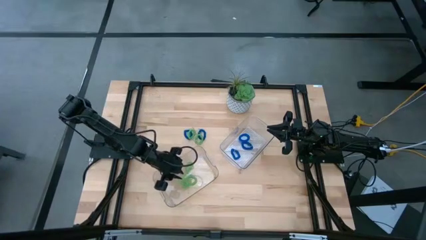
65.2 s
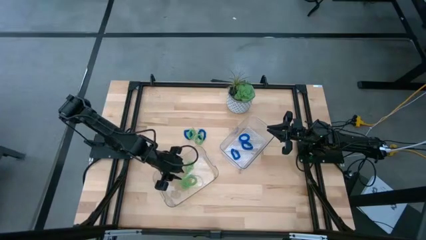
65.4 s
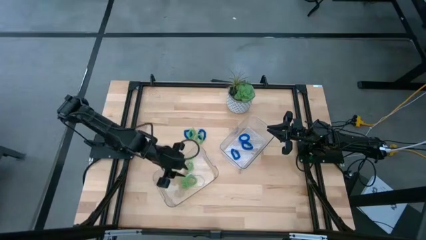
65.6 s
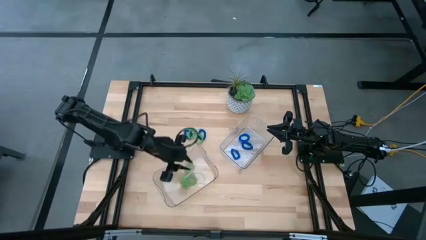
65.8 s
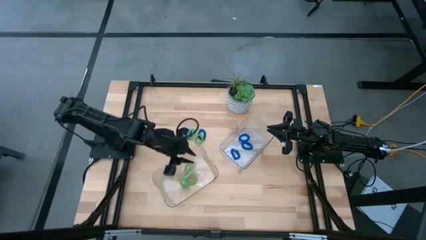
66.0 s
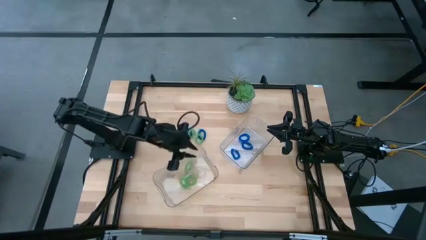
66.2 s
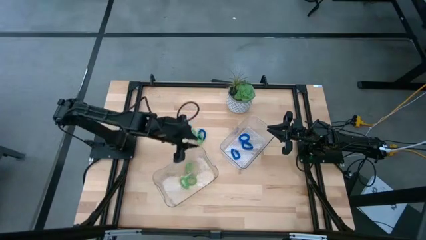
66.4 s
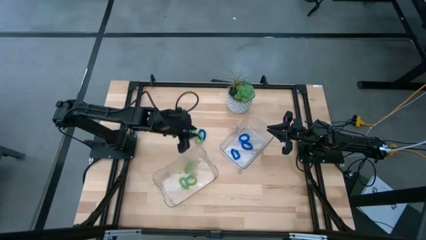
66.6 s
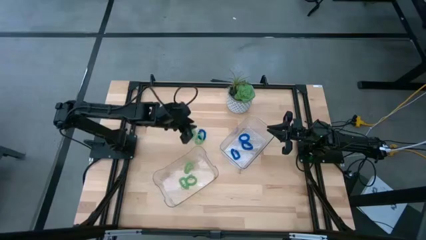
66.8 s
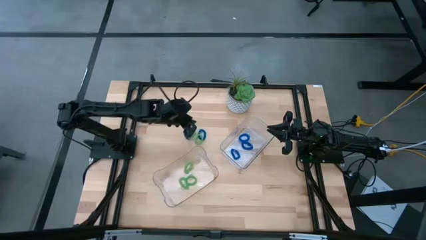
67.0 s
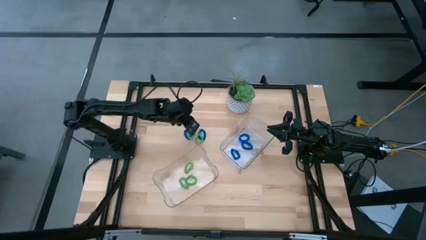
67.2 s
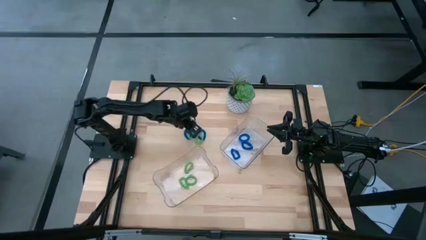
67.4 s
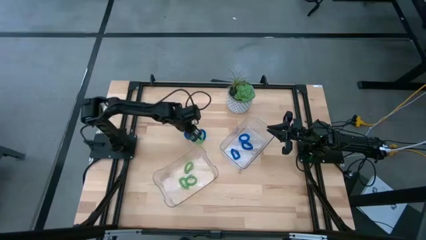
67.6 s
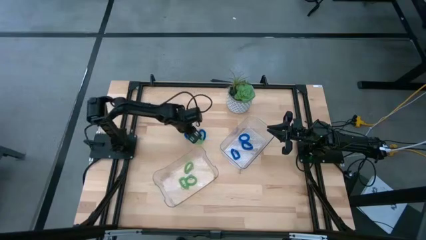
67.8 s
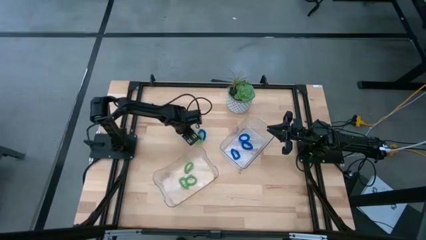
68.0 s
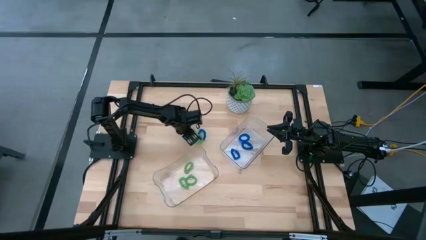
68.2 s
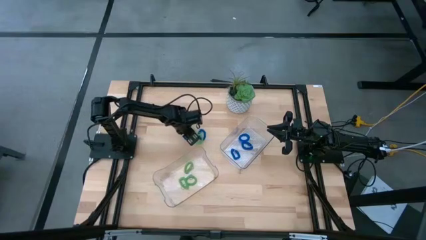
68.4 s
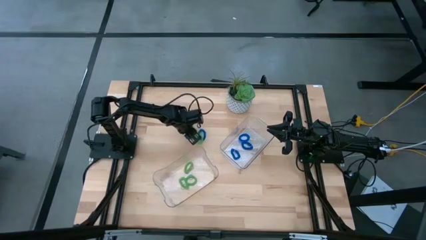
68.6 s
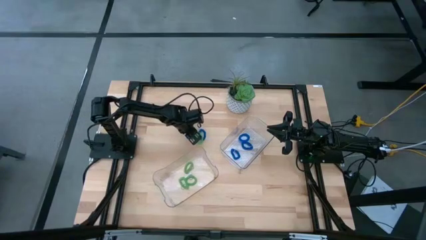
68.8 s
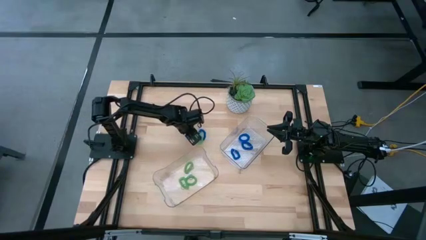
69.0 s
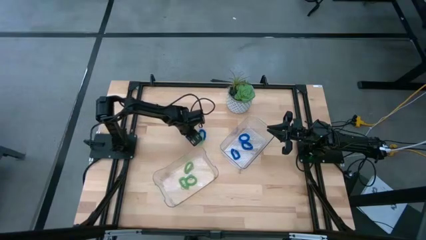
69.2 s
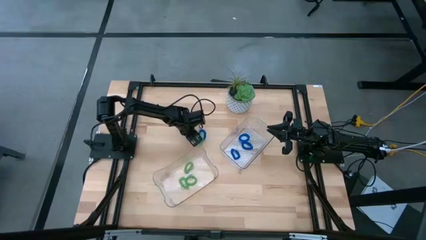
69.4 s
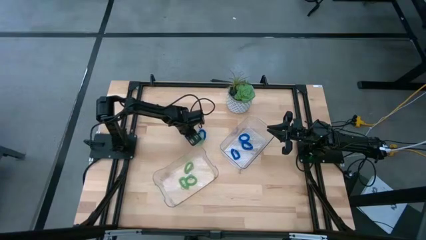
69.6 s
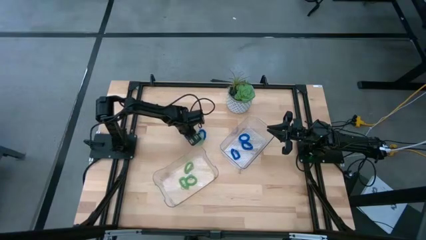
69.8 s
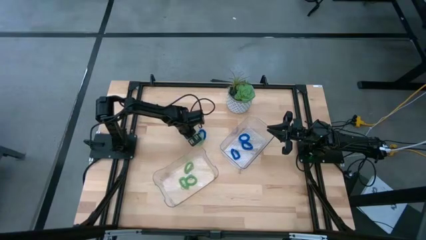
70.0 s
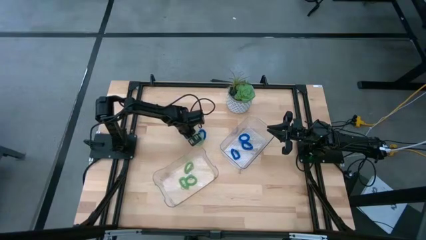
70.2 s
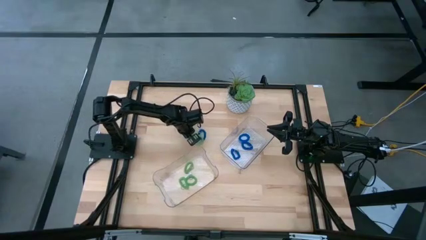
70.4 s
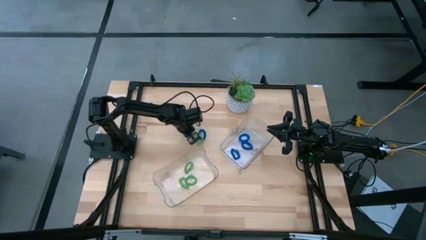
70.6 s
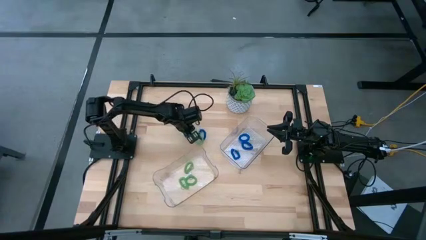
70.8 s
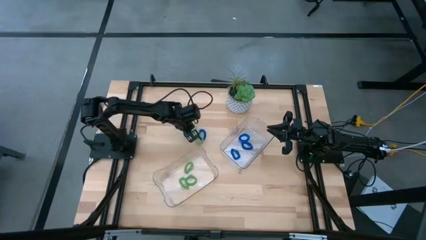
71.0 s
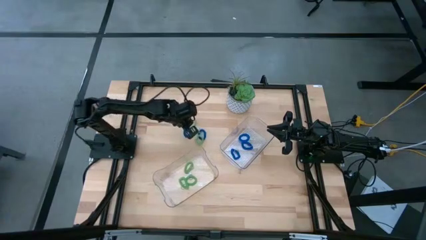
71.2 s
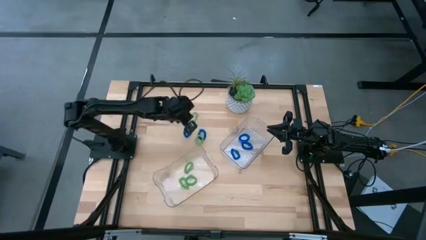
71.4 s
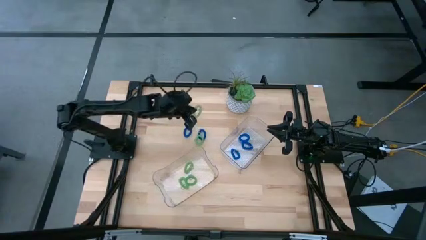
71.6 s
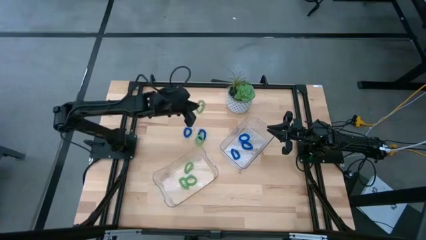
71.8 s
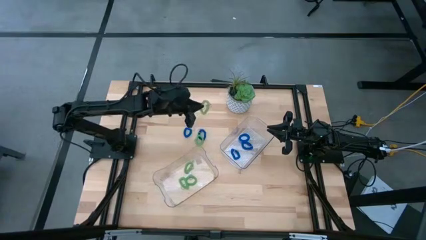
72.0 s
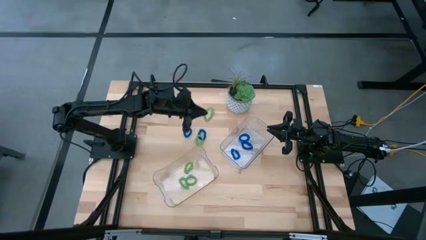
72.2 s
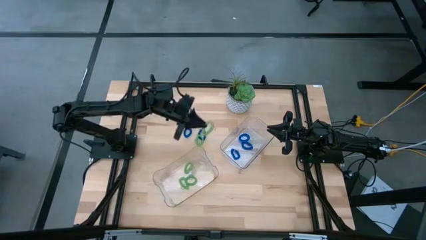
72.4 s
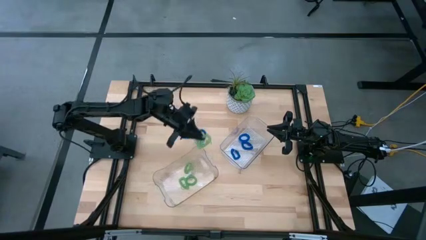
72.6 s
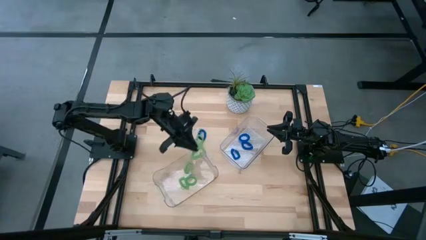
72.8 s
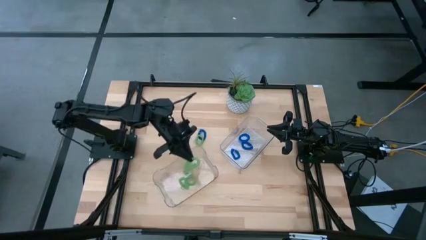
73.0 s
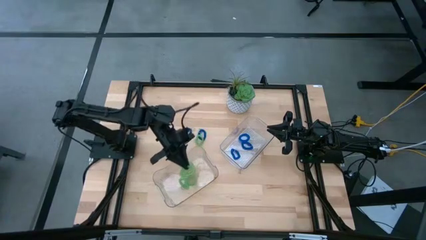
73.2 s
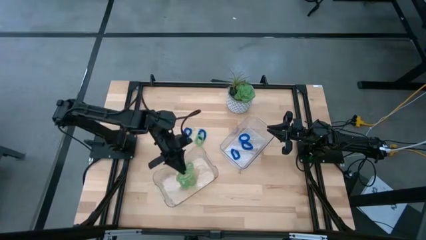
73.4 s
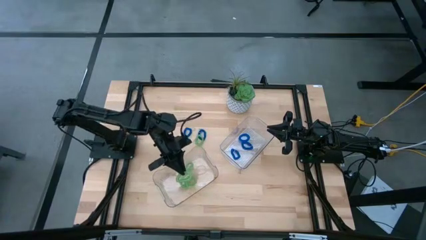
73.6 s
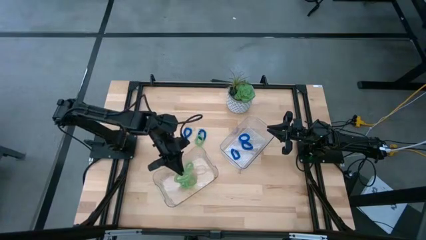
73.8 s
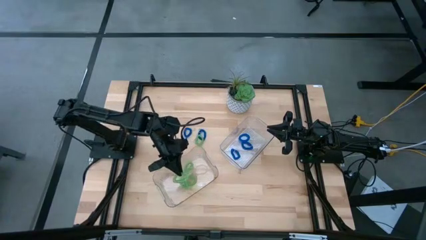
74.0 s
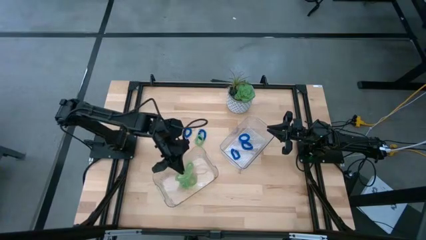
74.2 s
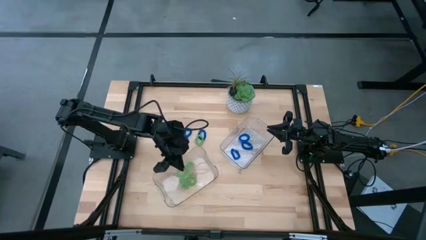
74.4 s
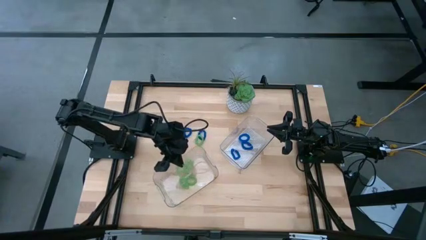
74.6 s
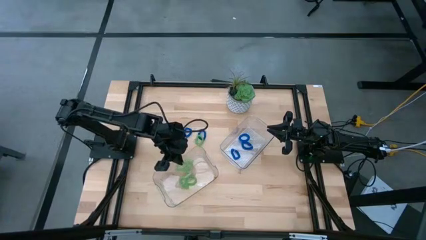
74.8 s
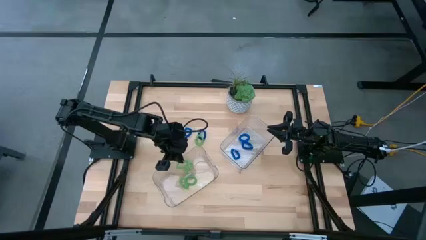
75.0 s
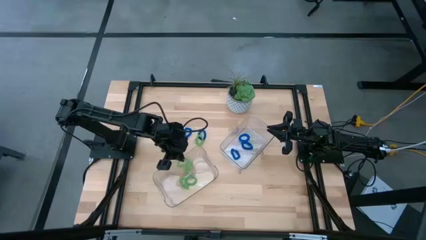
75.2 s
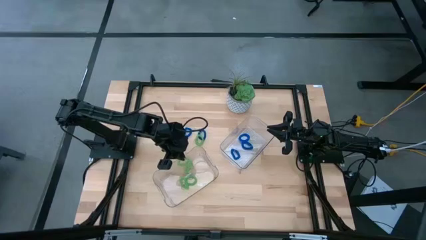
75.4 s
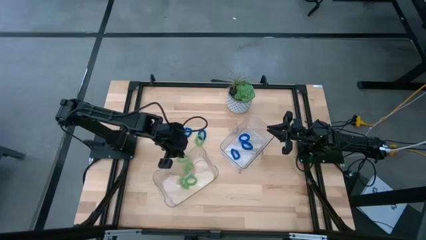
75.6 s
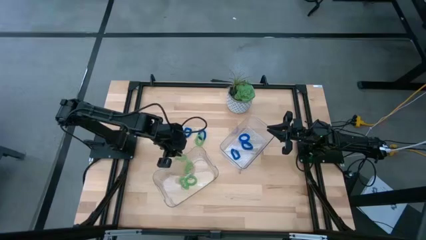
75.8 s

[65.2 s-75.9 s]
Task: Sort spring keychains
Put the green spring keychain into the bottom transparent bin

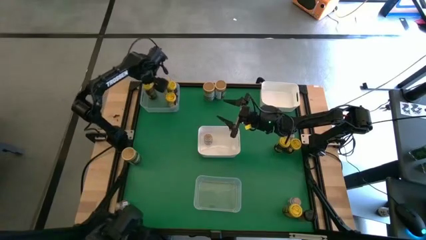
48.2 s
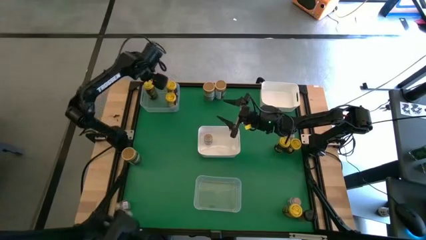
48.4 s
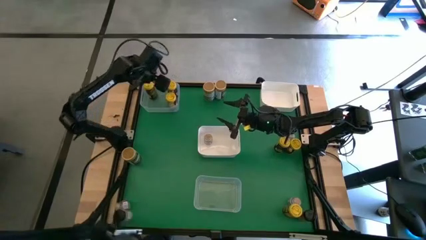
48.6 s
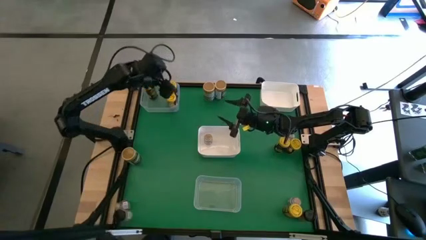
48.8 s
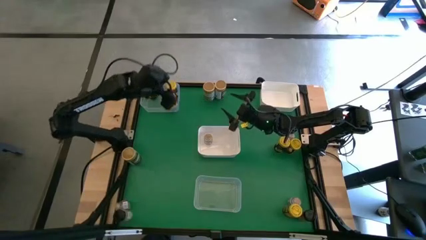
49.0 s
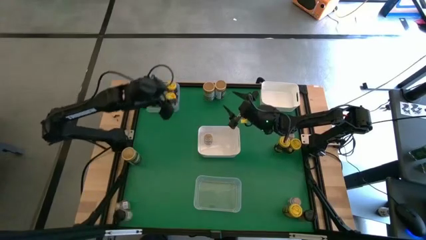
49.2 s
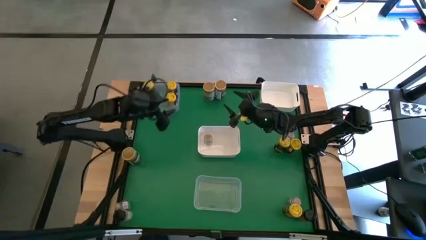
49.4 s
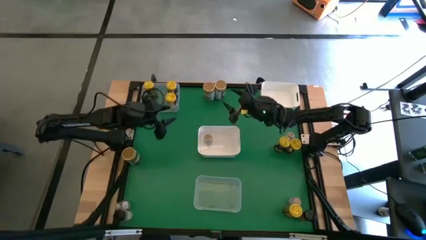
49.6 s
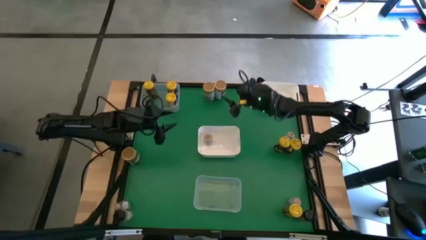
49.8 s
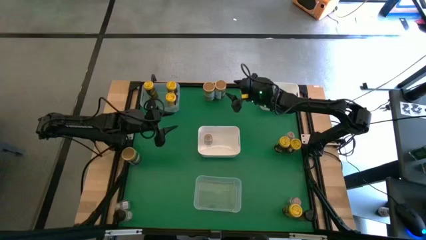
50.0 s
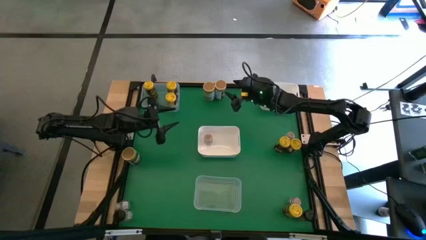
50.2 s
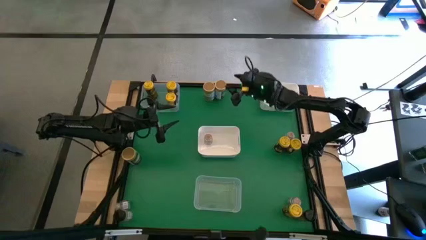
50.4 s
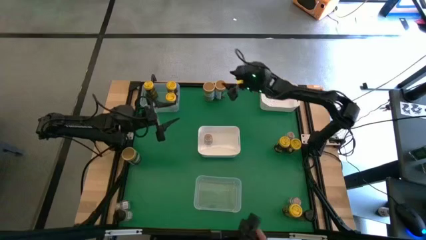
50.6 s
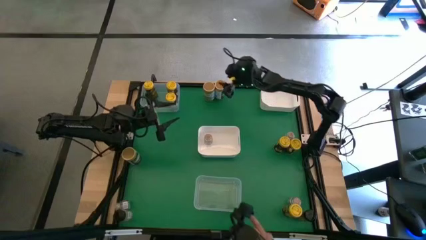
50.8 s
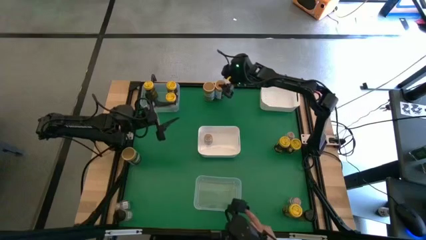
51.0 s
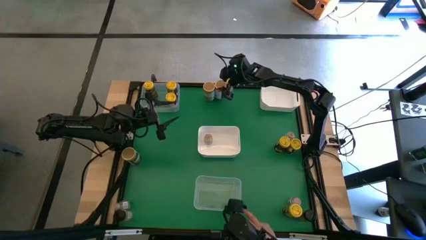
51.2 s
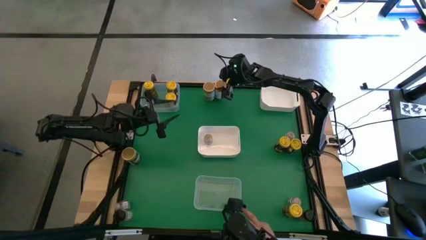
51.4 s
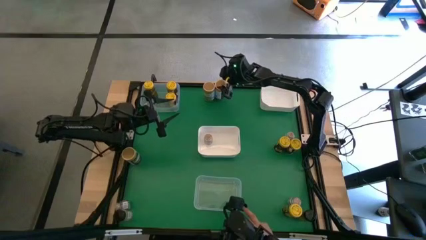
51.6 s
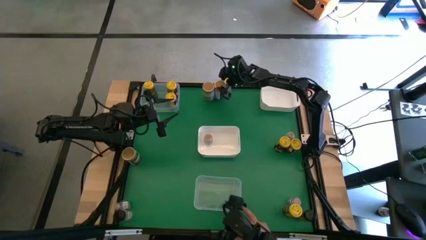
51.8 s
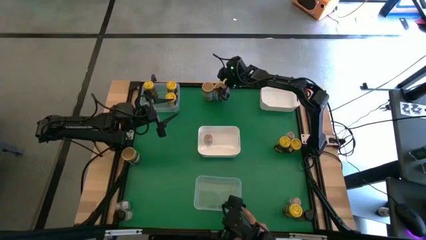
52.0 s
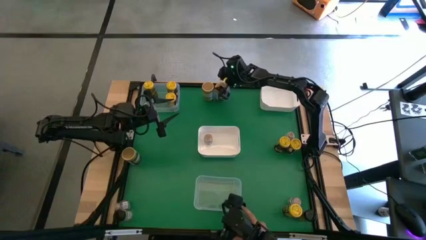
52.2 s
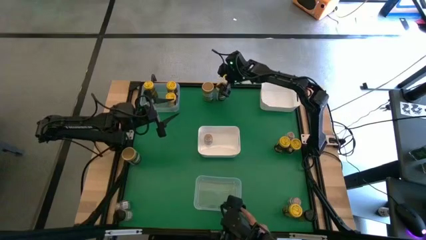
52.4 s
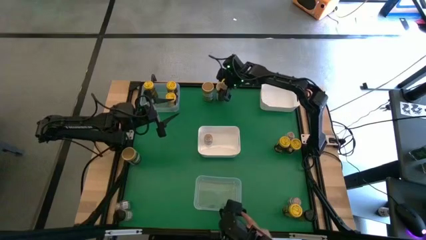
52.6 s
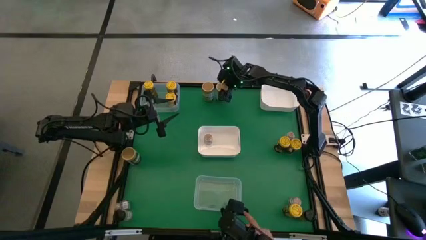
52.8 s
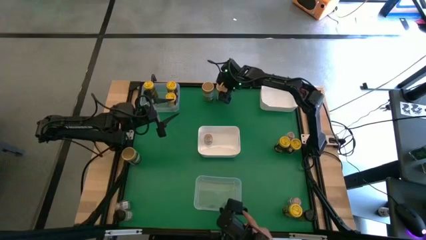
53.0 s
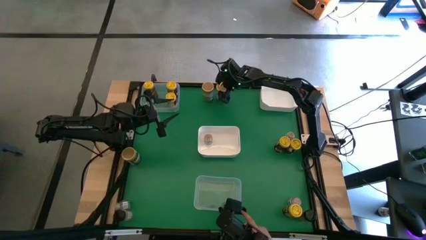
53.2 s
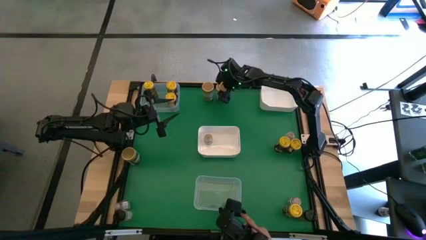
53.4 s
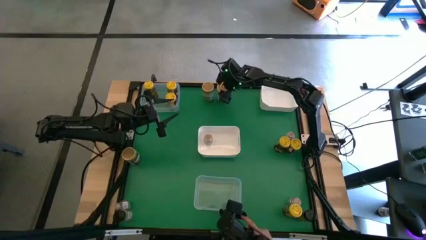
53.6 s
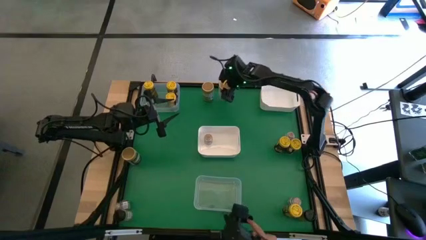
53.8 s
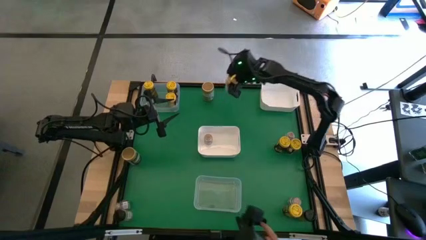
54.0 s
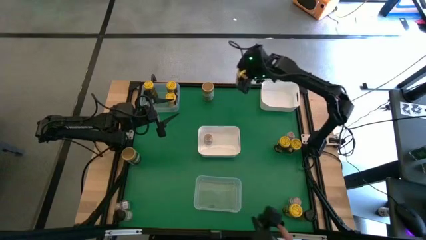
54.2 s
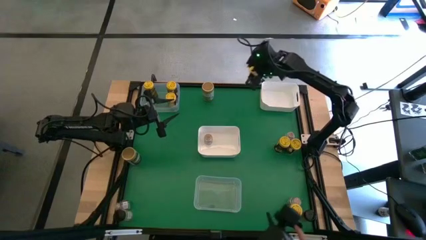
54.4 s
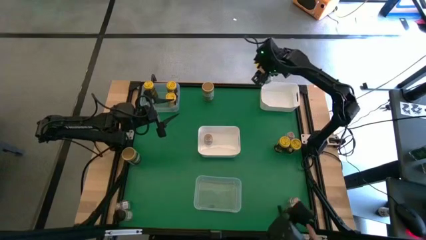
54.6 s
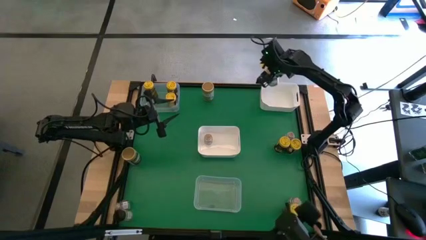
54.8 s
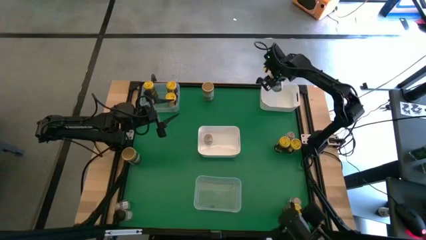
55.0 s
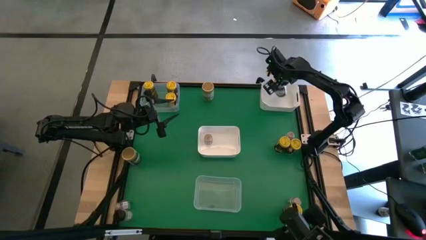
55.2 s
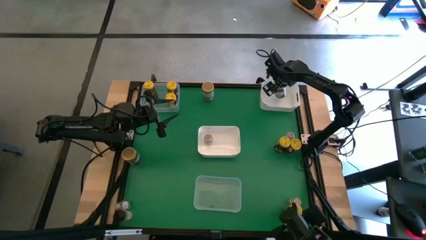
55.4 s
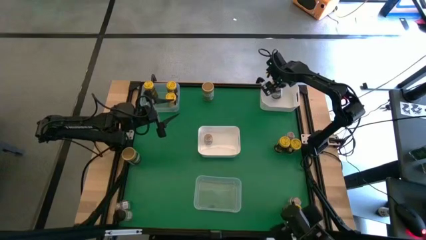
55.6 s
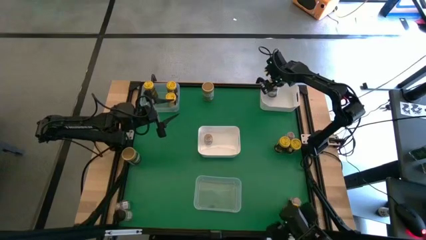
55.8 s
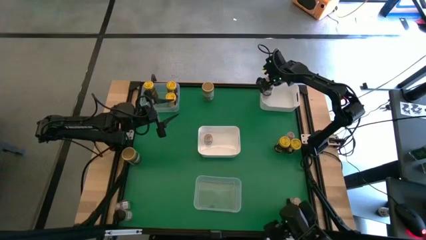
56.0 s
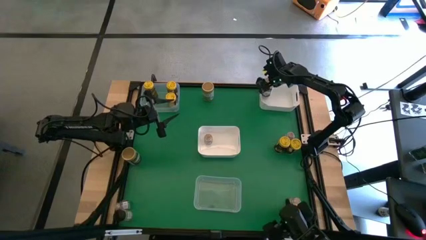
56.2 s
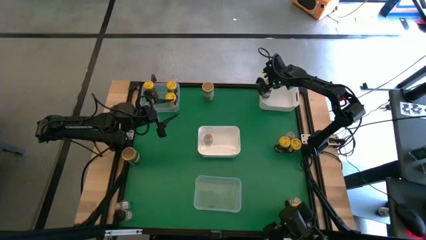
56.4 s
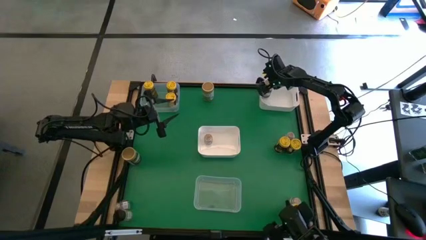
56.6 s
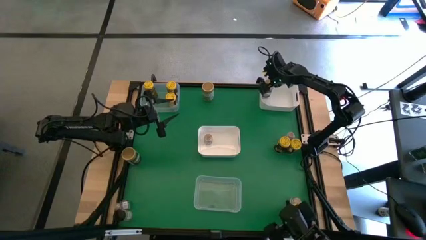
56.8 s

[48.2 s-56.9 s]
Task: Sort spices by type
Put the top right gold seasoning bottle into the top white bin
